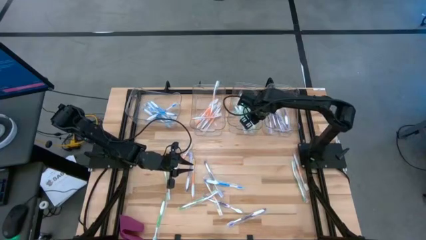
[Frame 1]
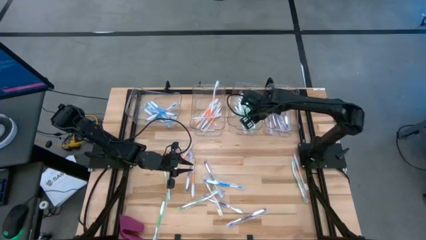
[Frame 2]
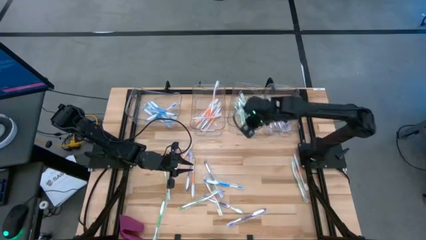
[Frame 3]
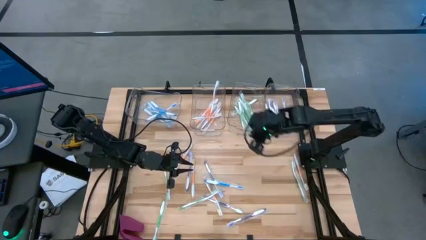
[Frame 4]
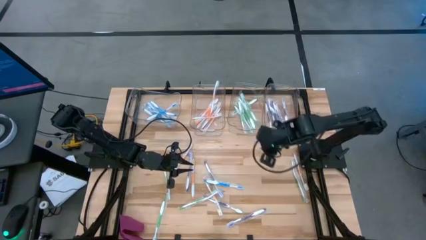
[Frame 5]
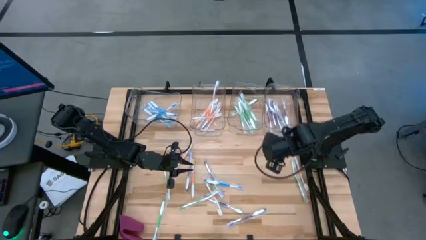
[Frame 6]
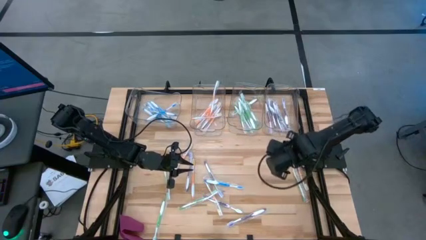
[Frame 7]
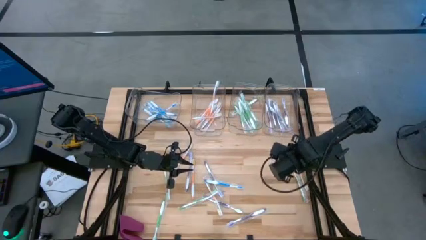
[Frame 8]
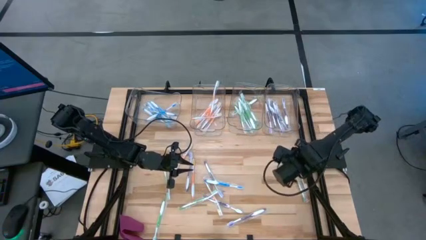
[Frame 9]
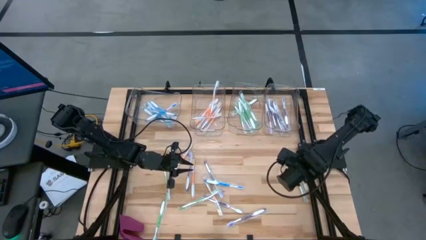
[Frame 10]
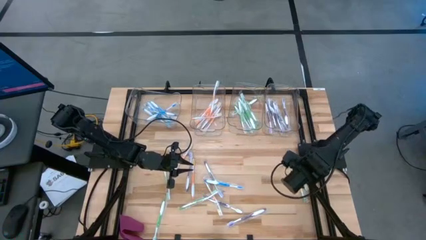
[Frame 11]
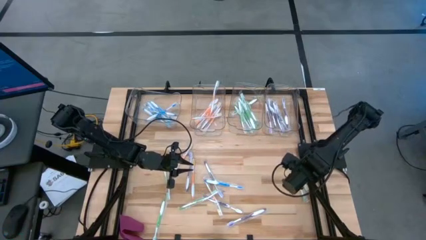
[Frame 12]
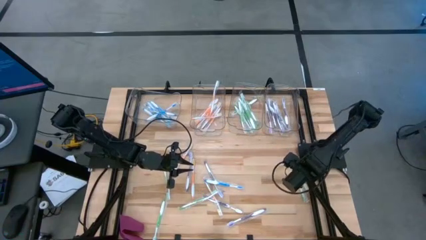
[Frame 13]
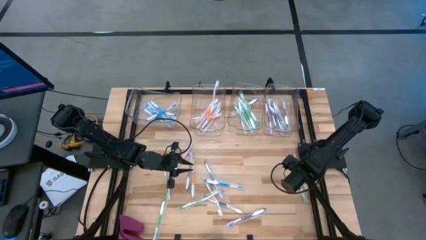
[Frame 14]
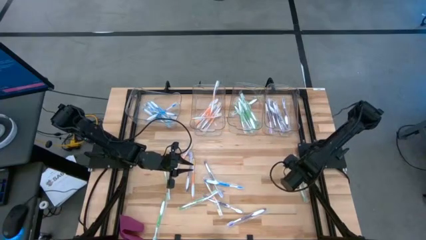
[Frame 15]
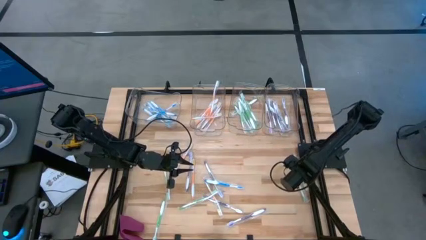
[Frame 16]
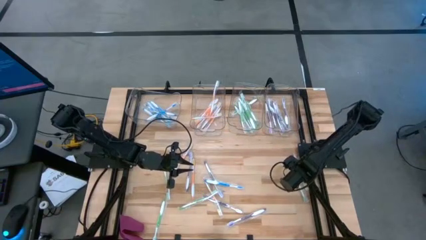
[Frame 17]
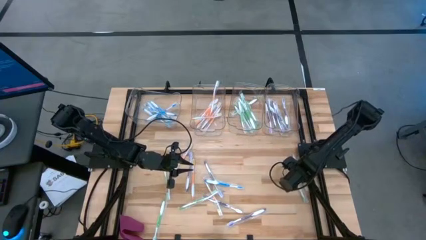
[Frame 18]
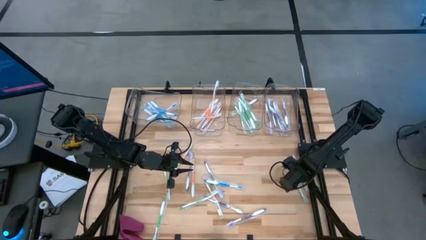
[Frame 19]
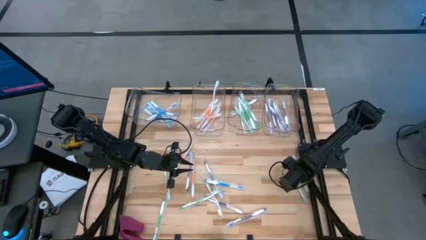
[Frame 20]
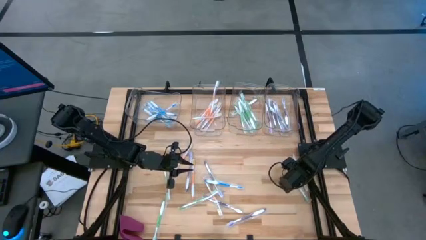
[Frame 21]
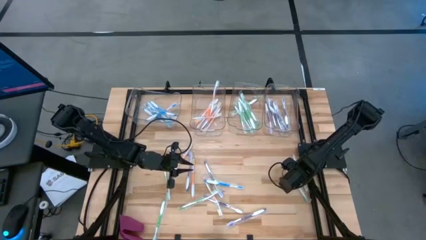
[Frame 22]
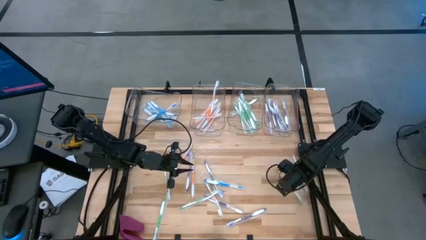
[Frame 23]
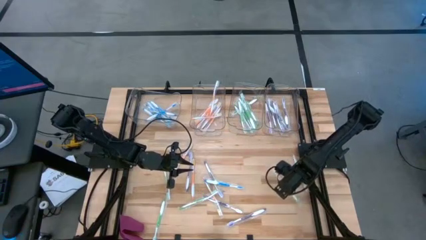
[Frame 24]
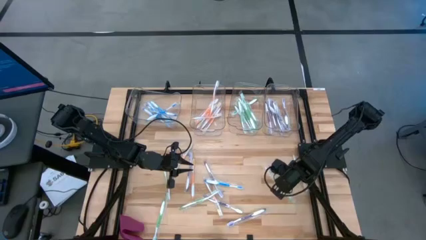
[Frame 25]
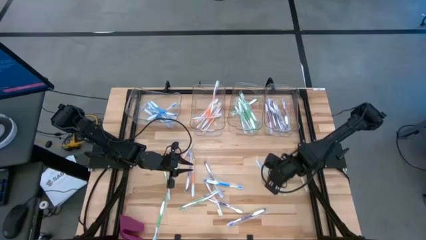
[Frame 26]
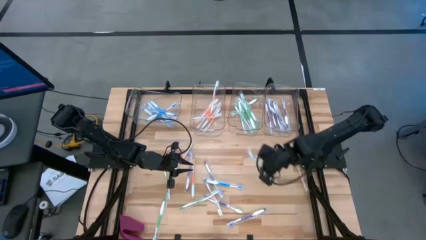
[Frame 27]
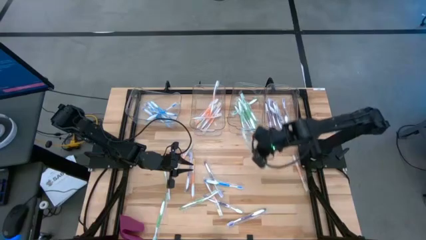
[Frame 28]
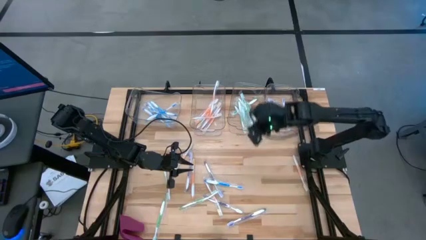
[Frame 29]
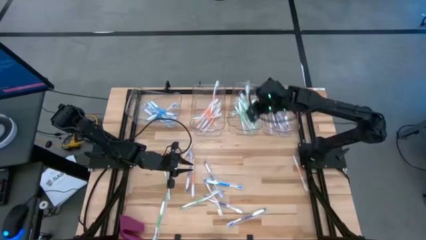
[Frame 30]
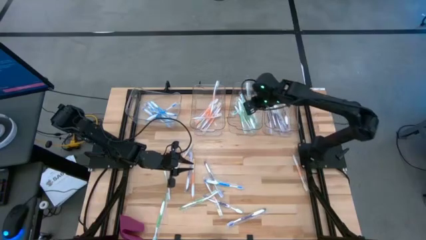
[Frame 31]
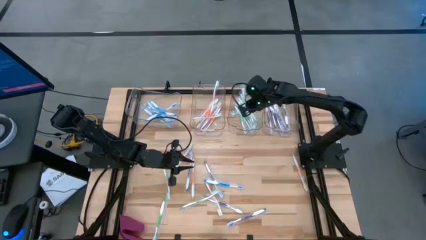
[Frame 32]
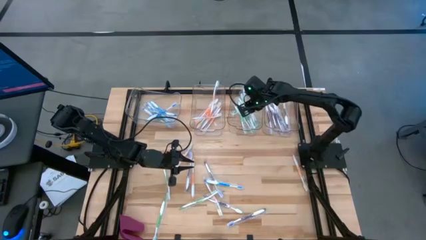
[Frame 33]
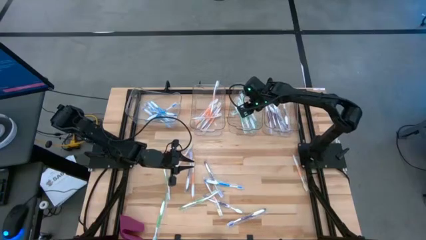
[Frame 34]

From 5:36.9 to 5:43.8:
Task: Pick & Place Toothbrushes
Put the green toothbrush into the middle right transparent bin

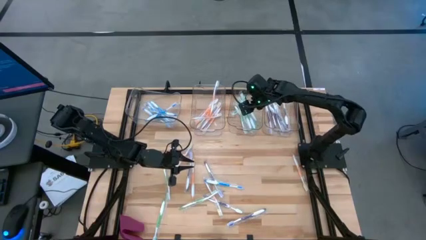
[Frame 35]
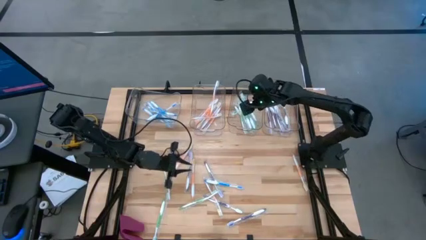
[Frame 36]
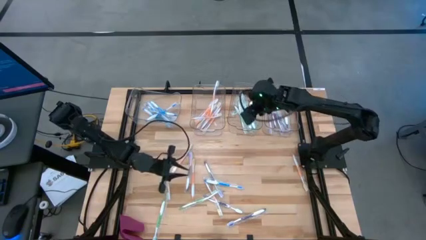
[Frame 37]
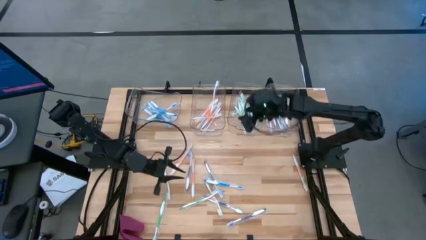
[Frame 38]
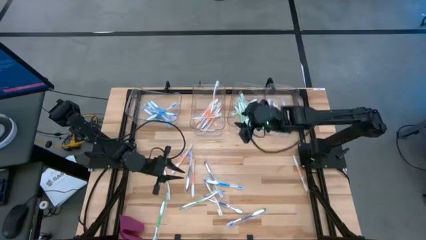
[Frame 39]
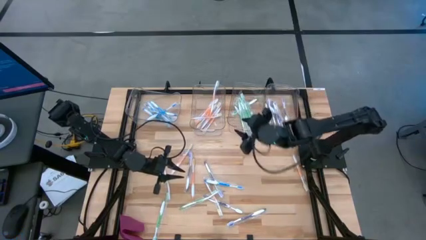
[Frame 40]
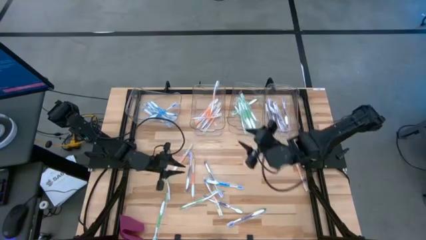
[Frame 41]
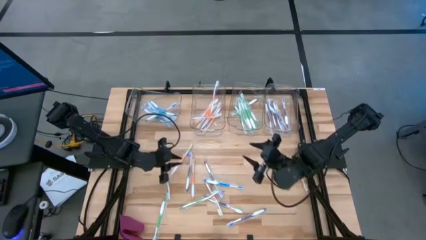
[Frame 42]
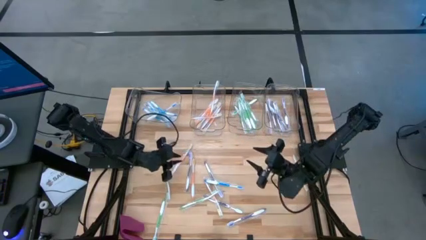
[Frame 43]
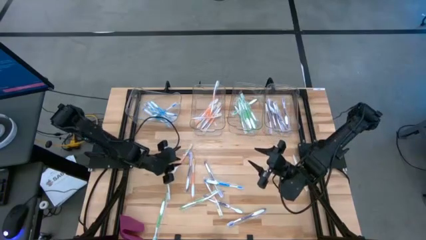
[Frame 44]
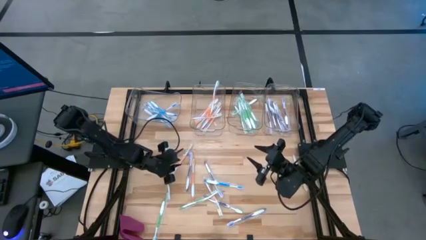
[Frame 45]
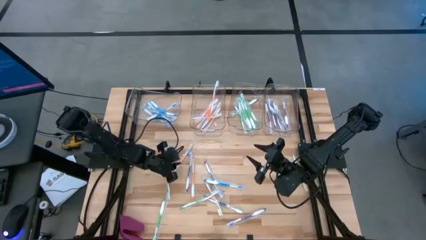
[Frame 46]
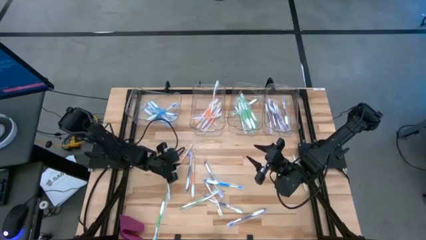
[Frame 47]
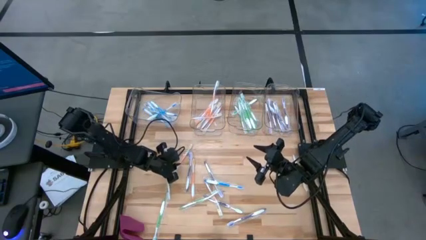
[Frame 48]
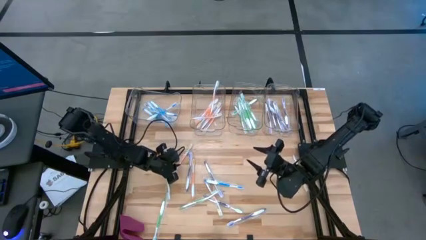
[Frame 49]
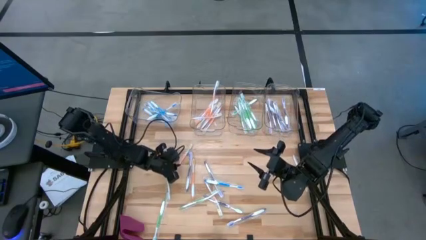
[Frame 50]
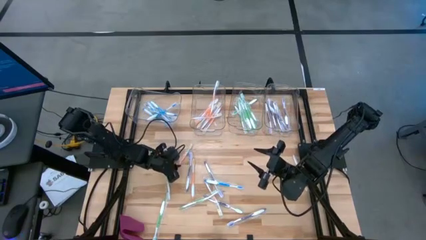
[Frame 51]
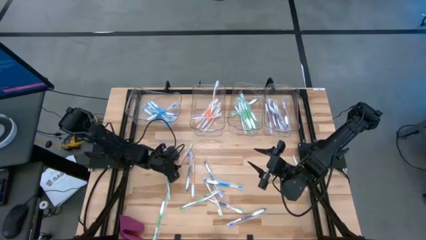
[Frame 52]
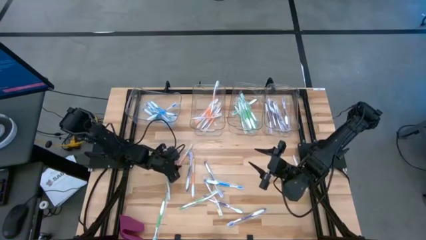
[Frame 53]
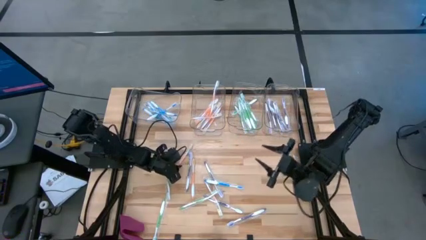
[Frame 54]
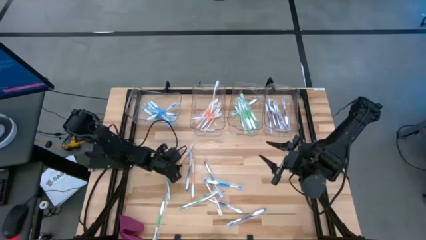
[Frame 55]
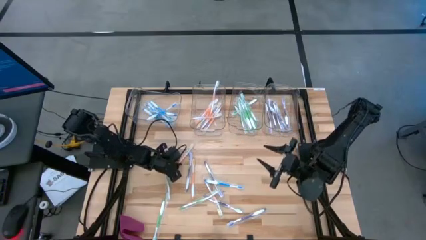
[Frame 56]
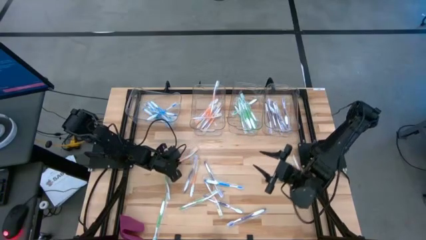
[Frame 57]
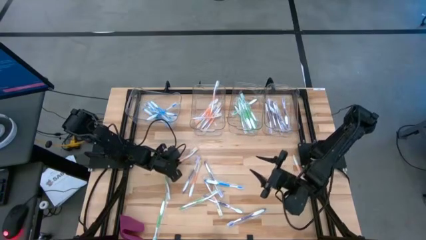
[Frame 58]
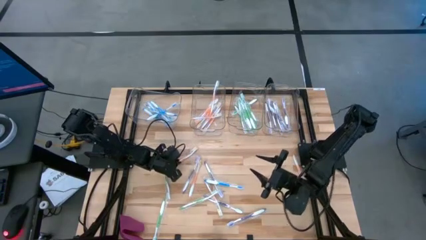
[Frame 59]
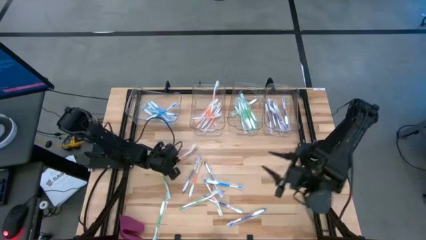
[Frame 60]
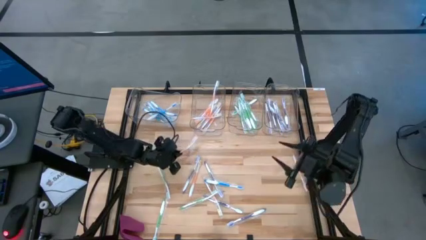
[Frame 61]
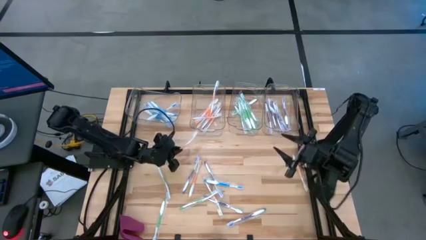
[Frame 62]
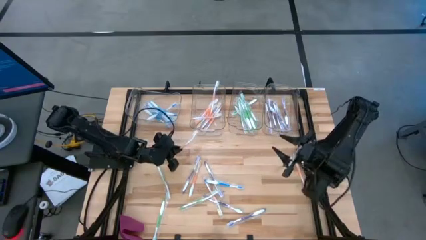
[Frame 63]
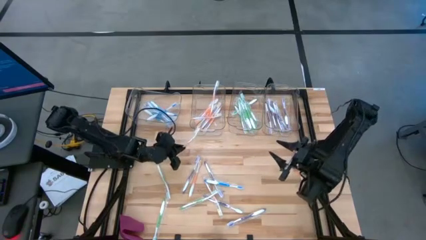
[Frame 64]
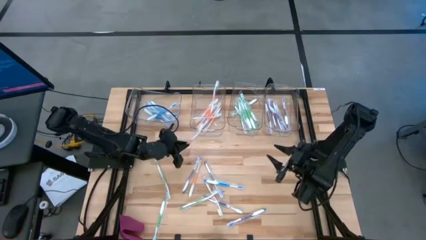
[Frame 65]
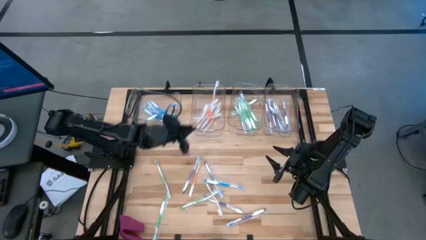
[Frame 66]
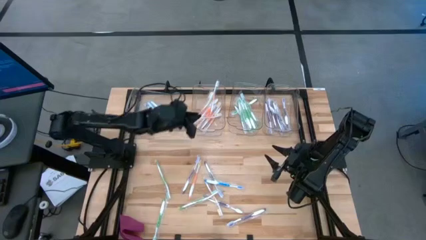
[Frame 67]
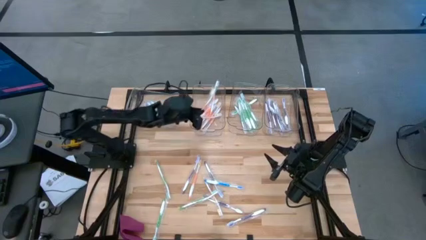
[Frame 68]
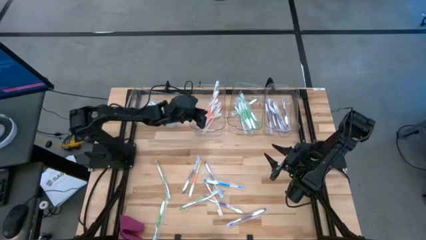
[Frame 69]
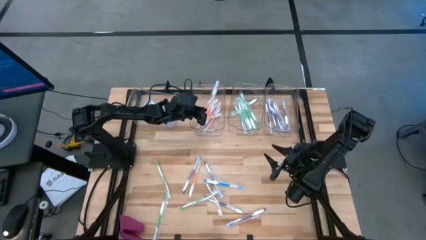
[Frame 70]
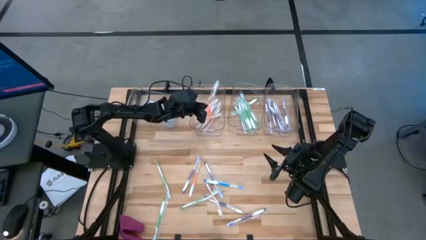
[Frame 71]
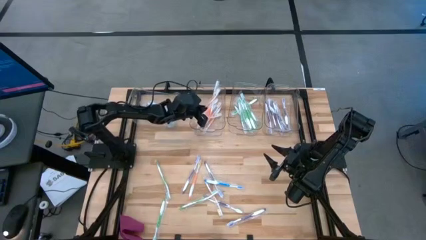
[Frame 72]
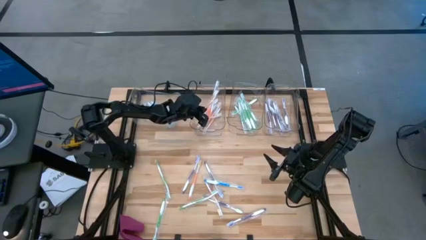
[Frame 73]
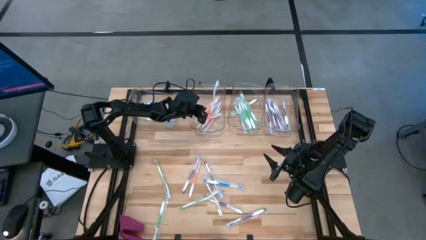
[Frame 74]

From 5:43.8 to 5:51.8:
Put the orange toothbrush into the middle left transparent bin

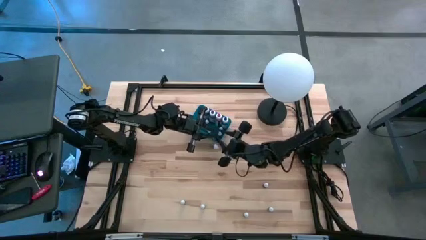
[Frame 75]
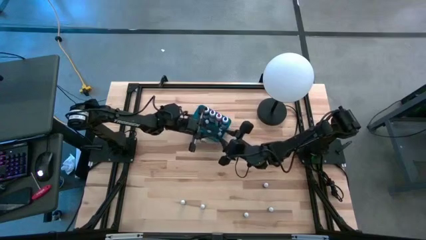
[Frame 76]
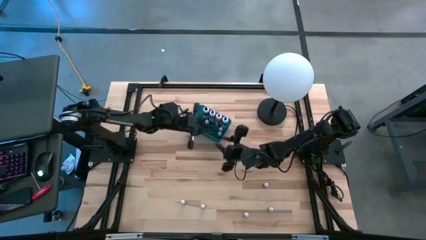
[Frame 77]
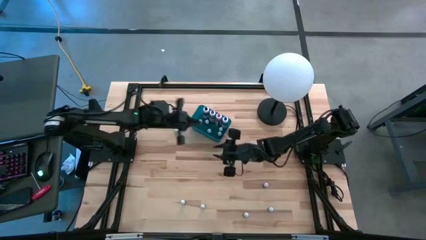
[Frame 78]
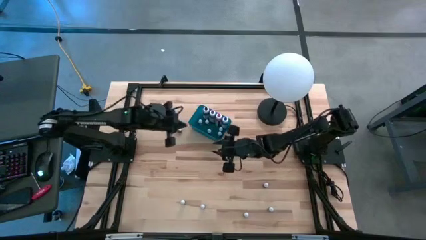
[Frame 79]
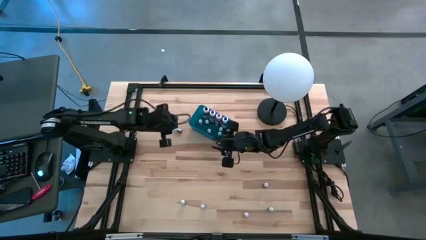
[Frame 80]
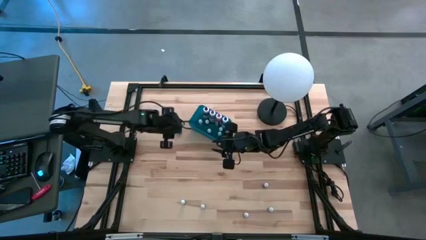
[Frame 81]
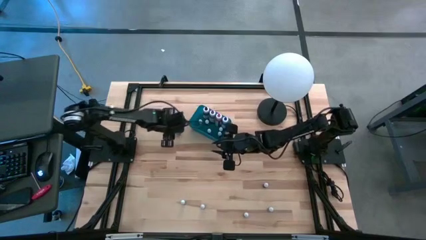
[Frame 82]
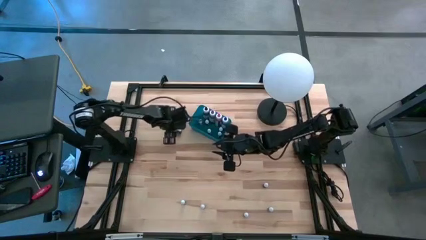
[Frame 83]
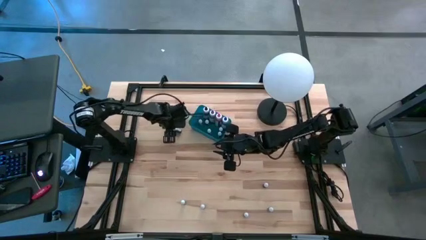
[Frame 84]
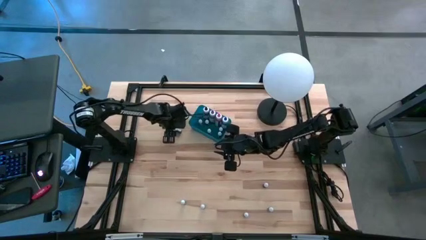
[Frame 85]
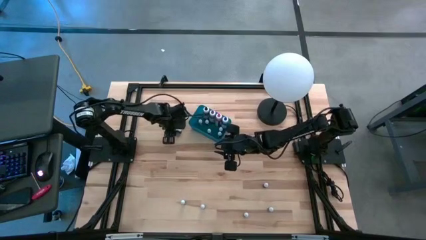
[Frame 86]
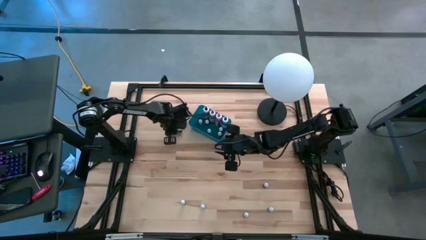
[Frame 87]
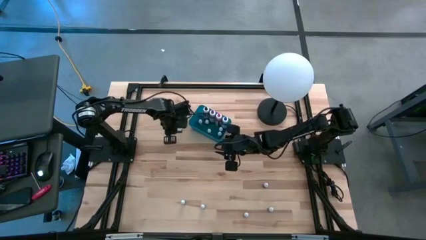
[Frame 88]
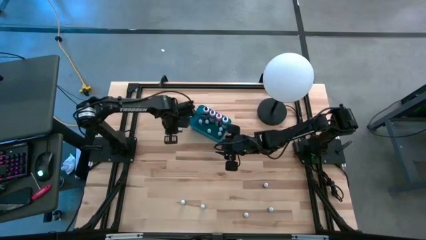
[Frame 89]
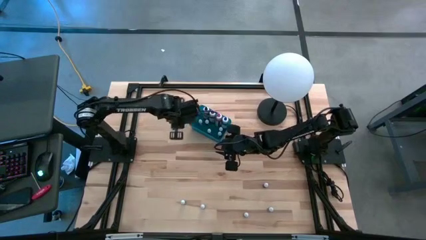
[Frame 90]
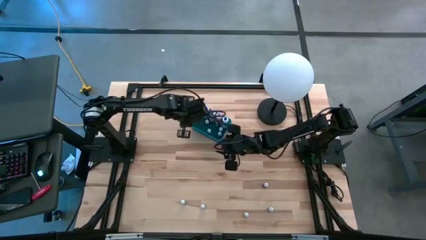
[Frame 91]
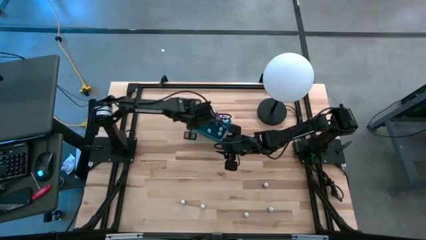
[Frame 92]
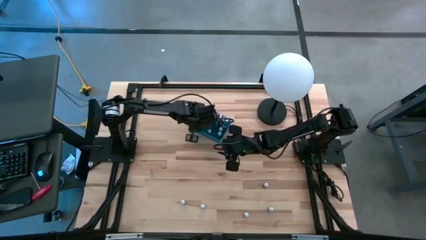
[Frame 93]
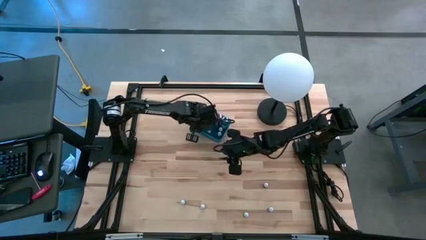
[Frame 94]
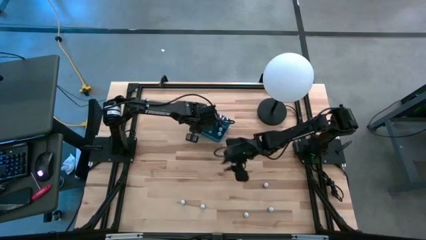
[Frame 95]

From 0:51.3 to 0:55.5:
Task: Pick & Place food coloring
Put the small purple food coloring bottle into the blue bin
